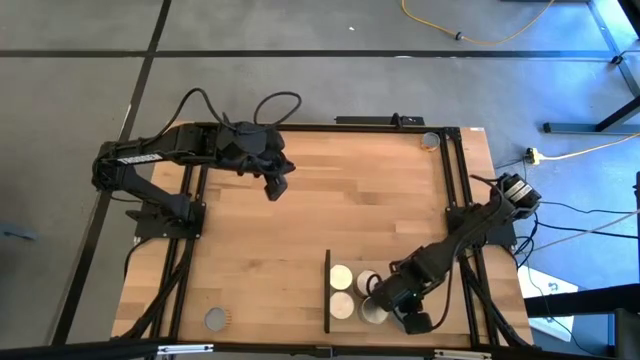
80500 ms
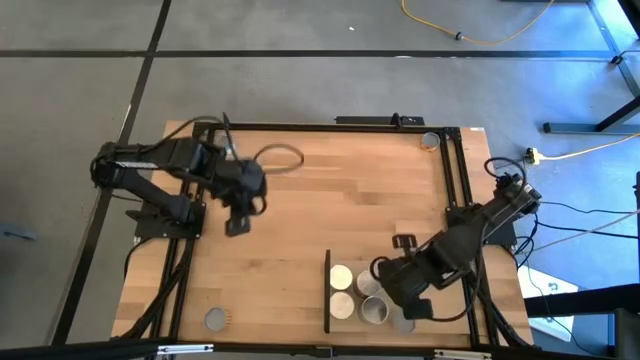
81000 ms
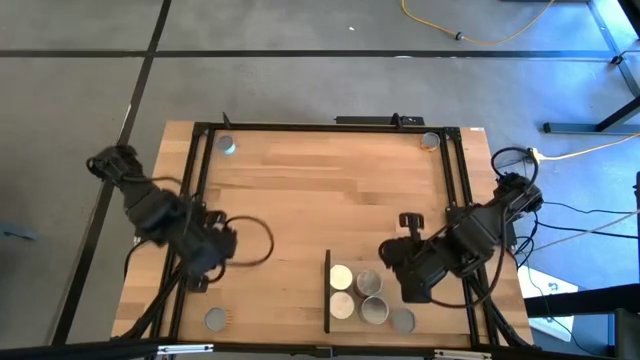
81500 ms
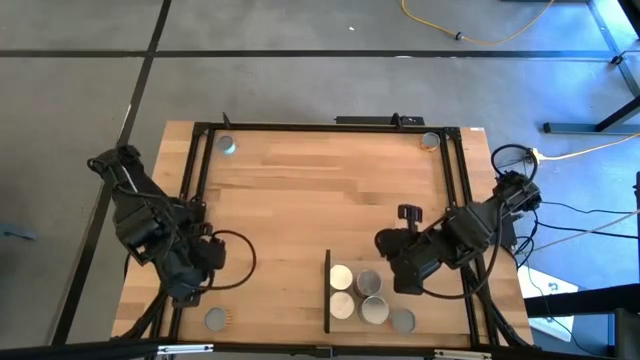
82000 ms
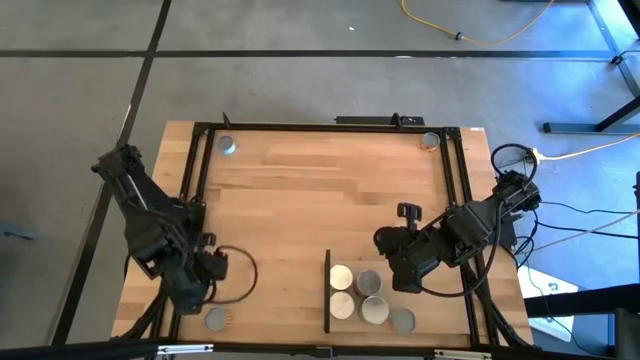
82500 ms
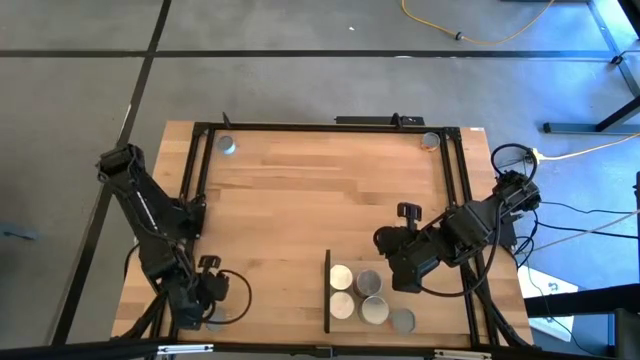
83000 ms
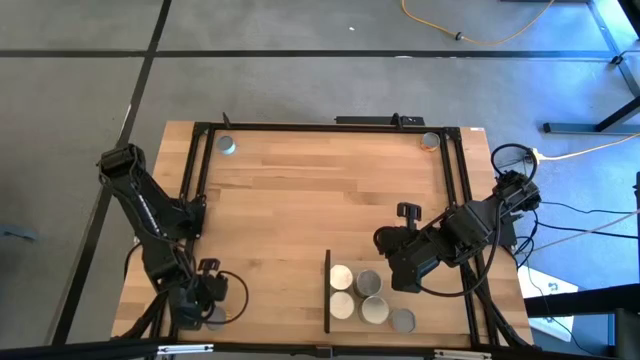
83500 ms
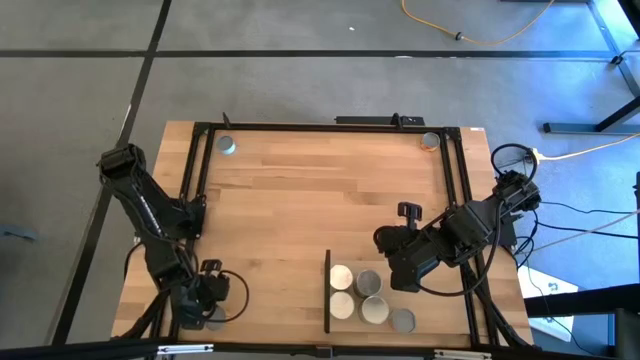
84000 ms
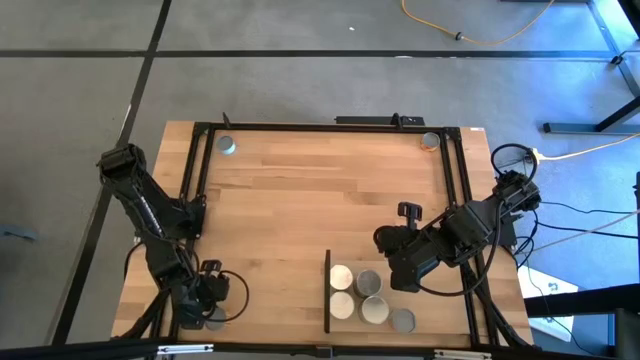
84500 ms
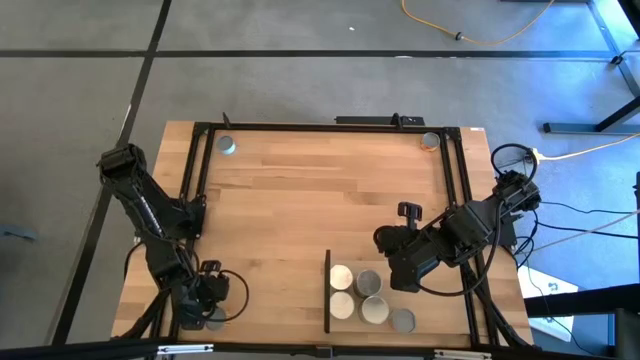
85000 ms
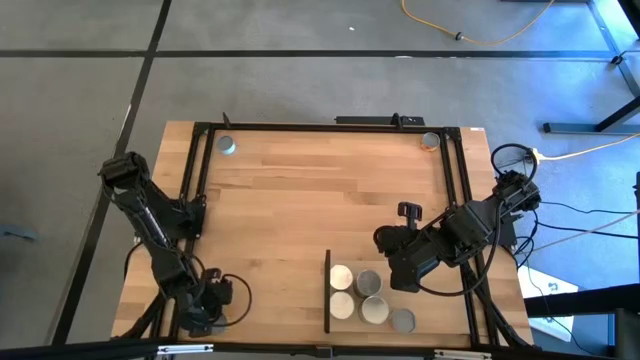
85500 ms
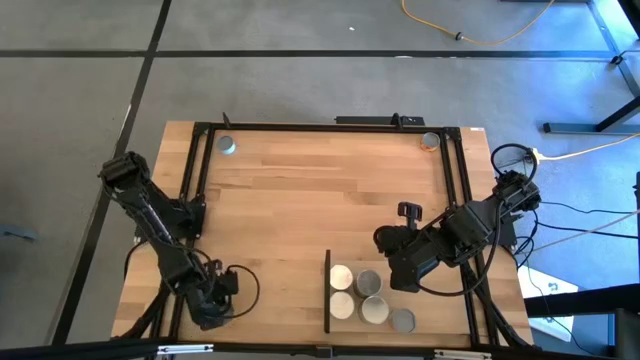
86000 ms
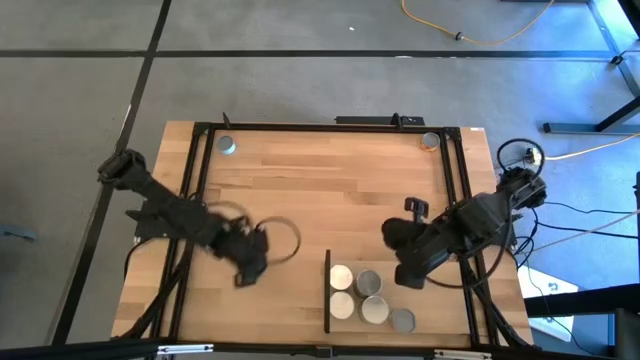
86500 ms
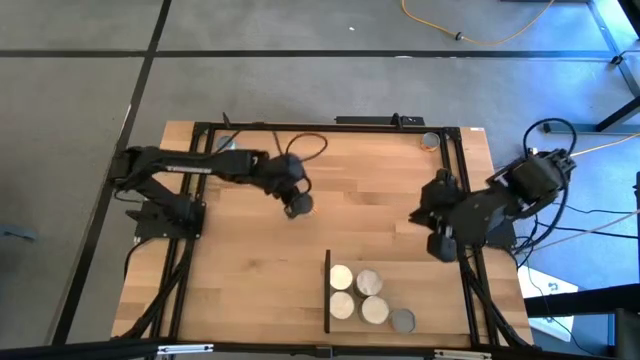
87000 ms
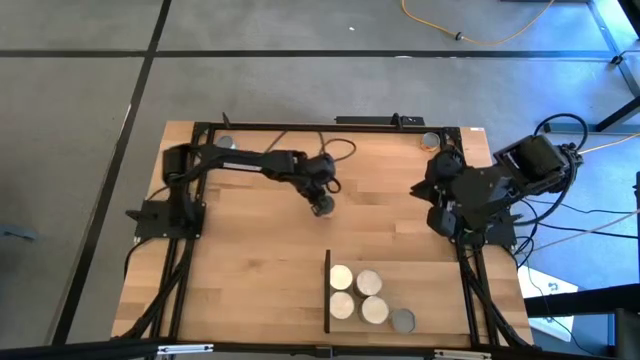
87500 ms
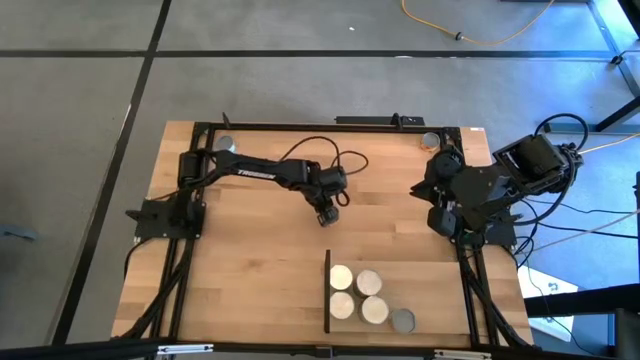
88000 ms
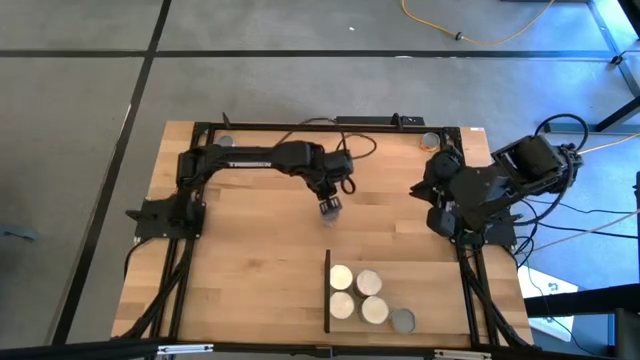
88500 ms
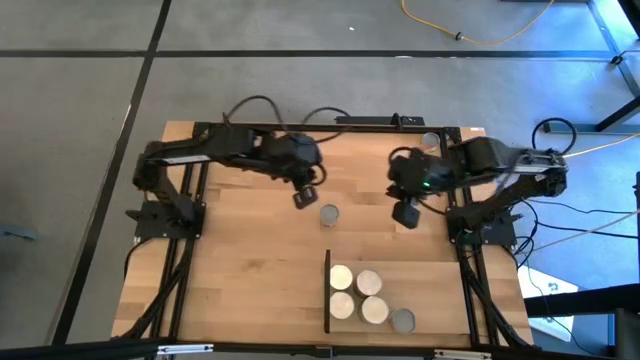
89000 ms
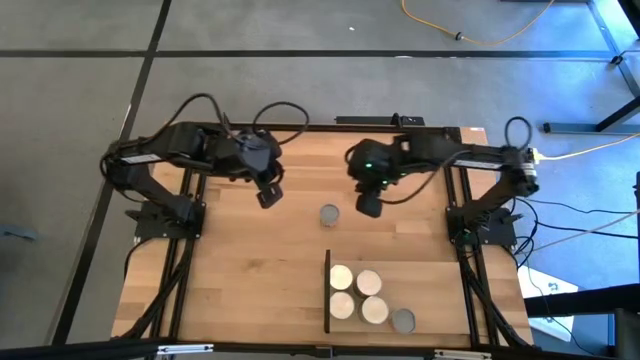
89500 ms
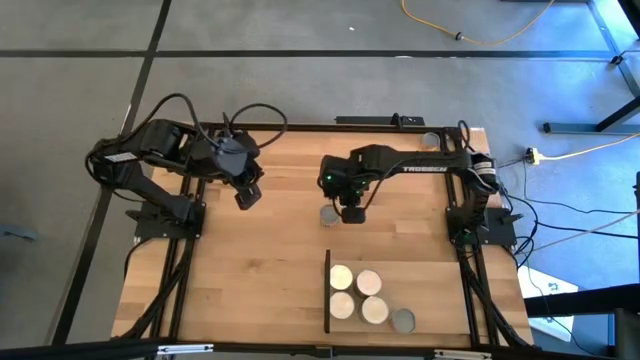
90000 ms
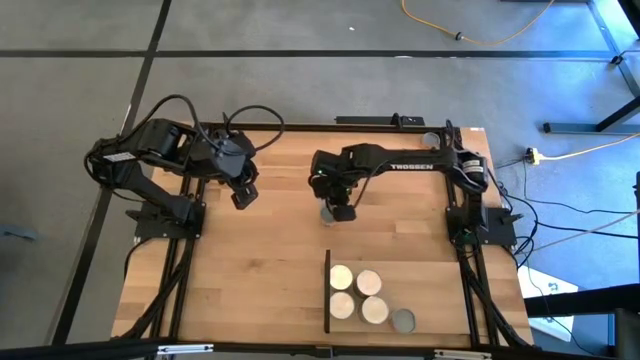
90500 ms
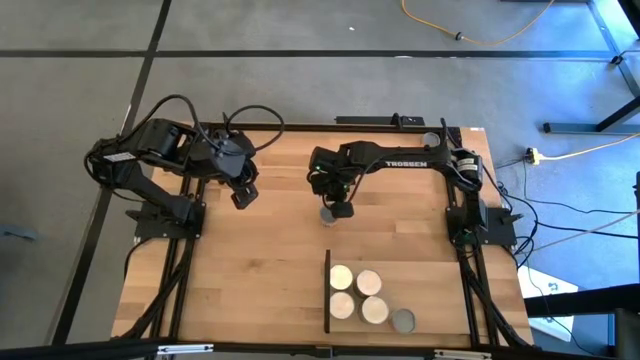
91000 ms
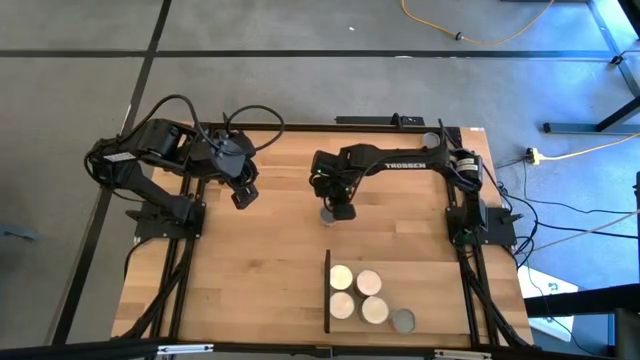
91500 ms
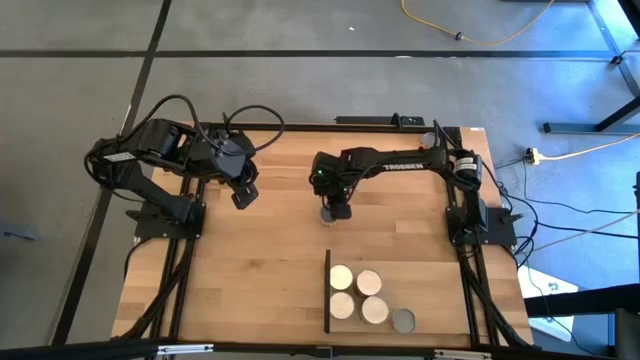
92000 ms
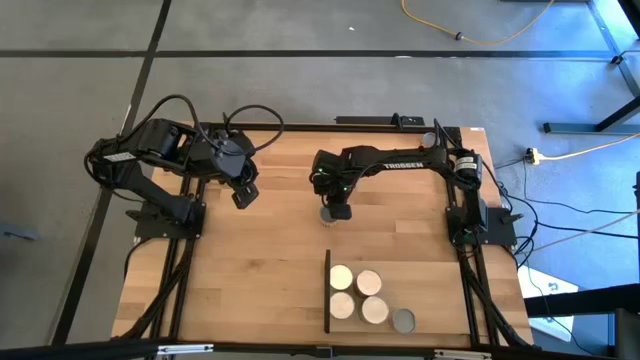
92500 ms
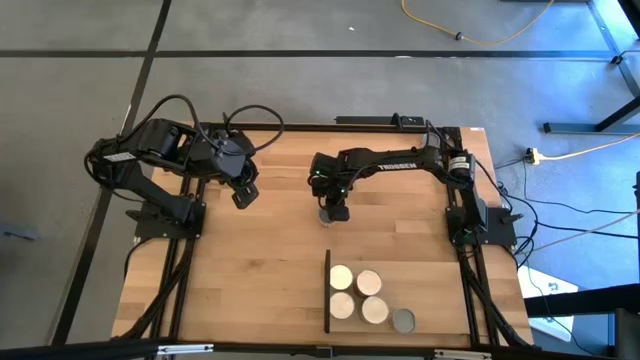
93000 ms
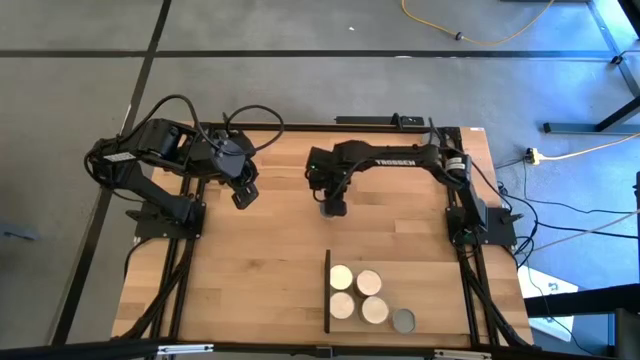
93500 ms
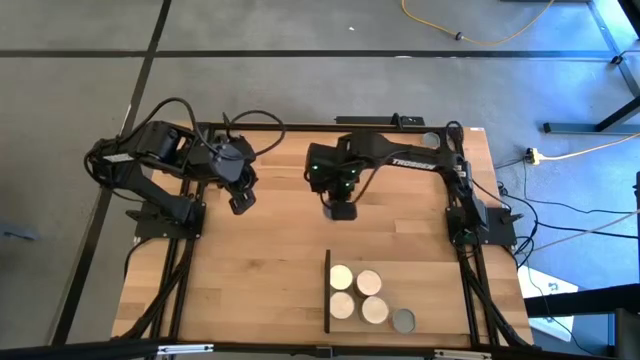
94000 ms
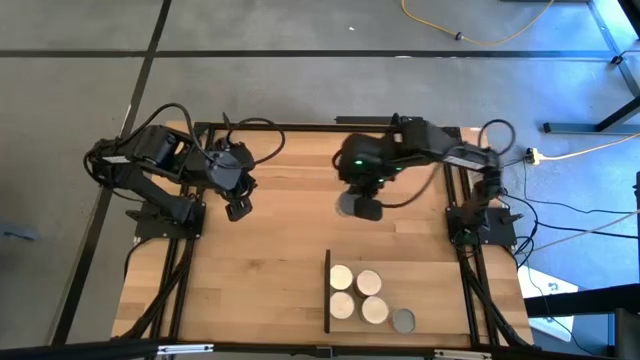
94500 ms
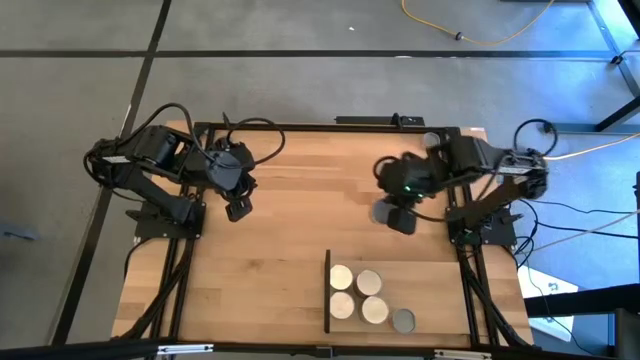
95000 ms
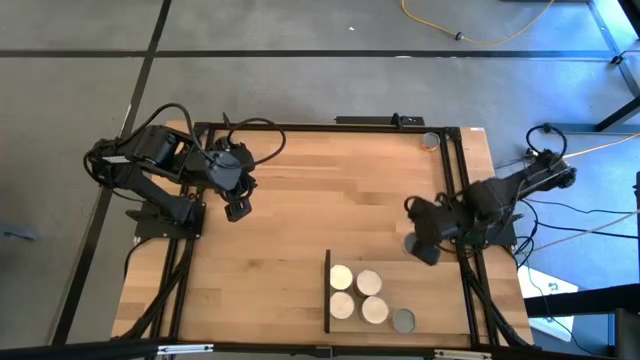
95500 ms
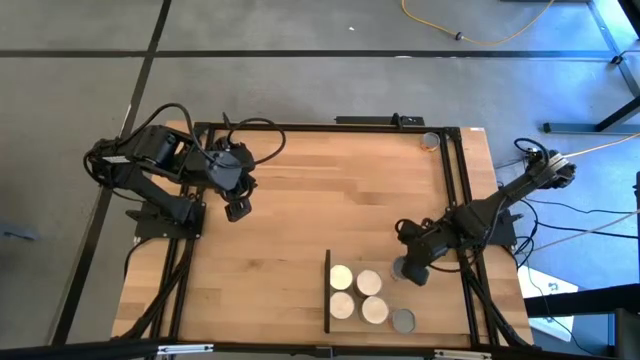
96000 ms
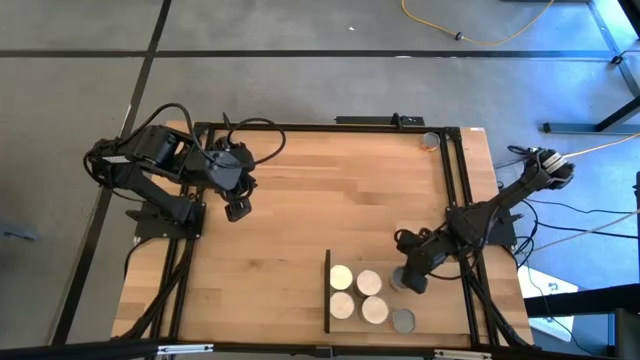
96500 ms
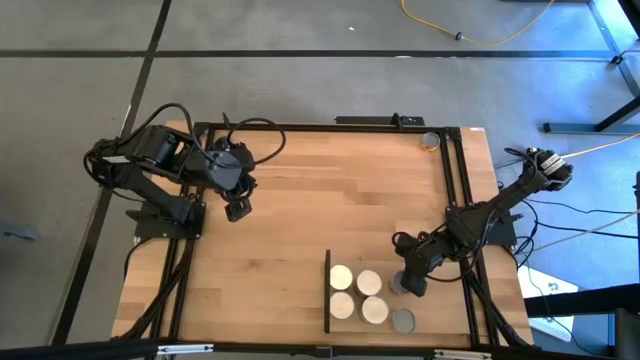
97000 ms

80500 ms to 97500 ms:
Task: Pick and place cans onto a shelf
Put the bottom canned pineapple rings on the shelf

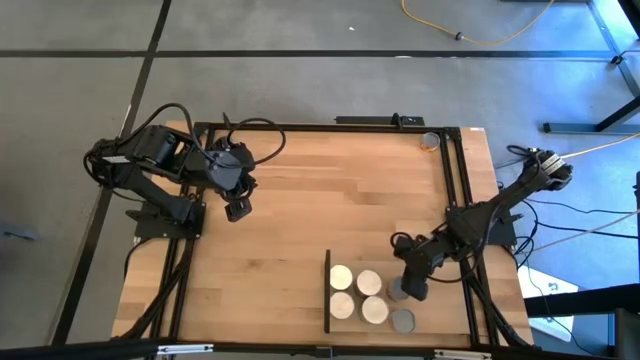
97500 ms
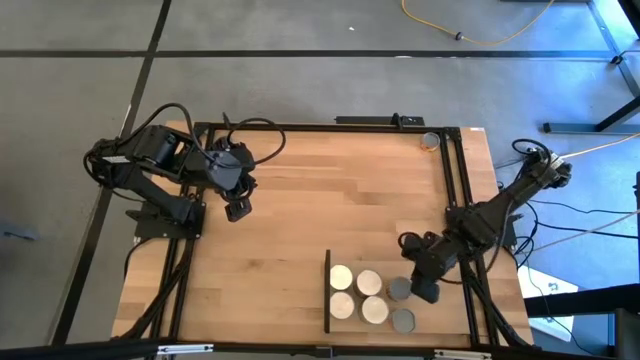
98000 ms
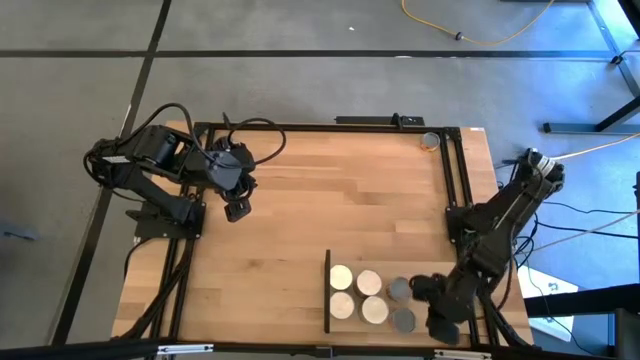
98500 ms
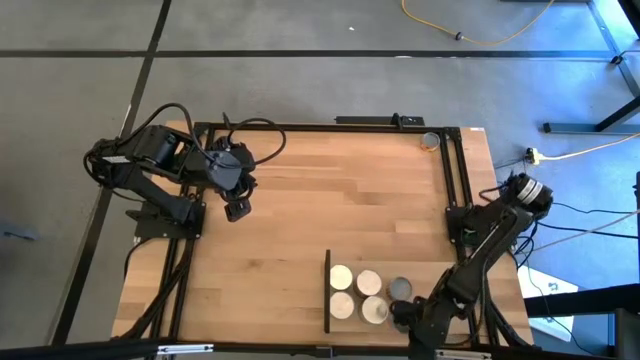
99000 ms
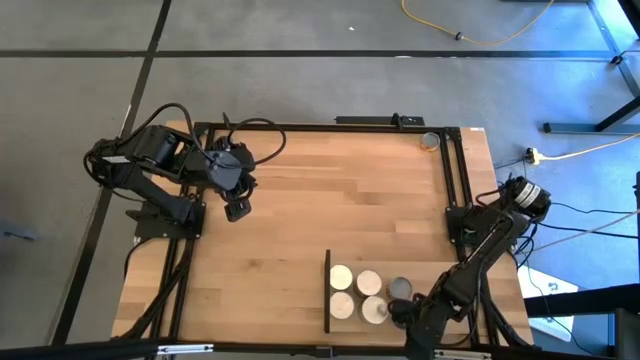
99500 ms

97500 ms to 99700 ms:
Adjust the canned diced tomatoes on the shelf

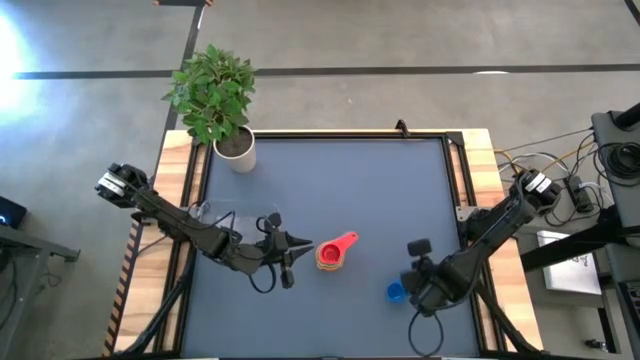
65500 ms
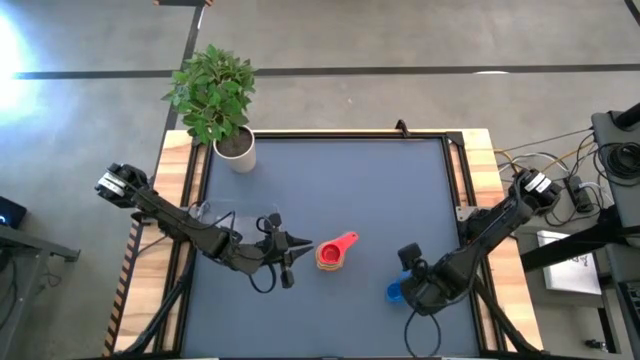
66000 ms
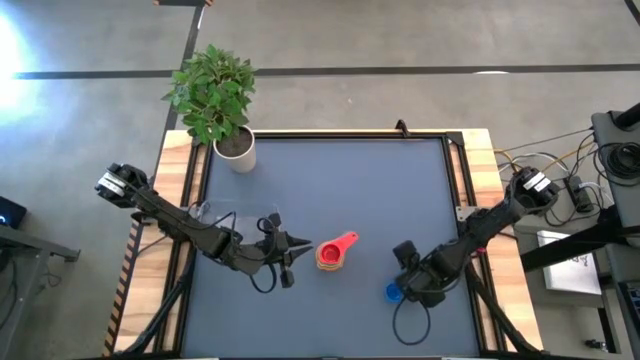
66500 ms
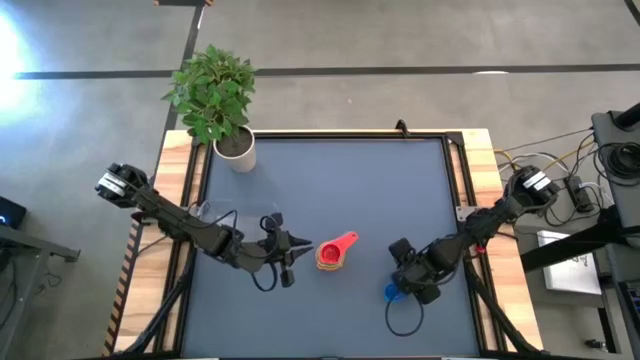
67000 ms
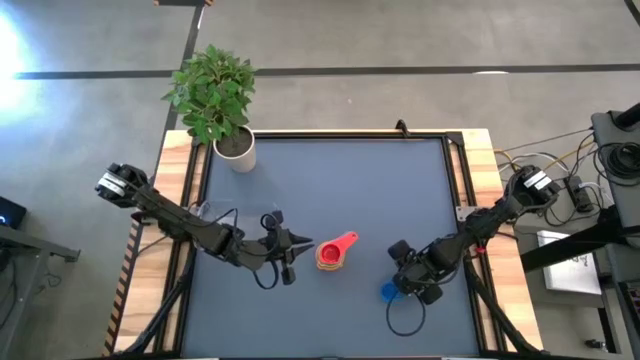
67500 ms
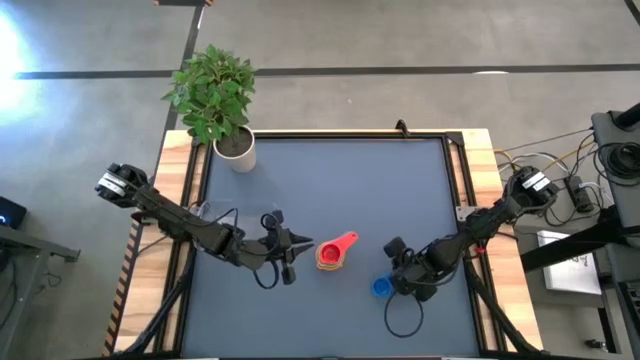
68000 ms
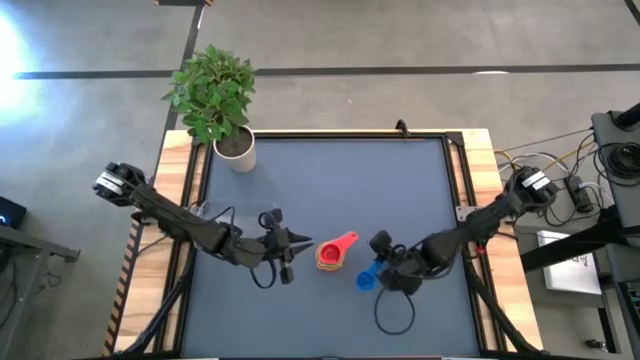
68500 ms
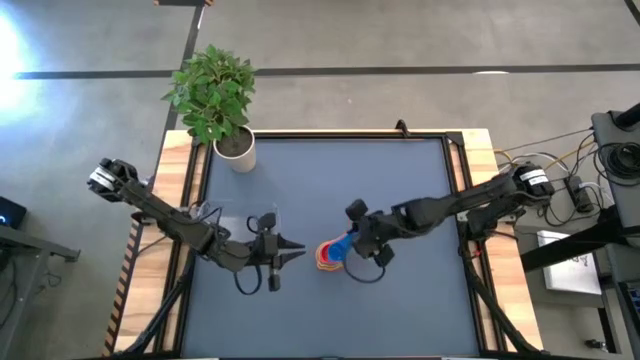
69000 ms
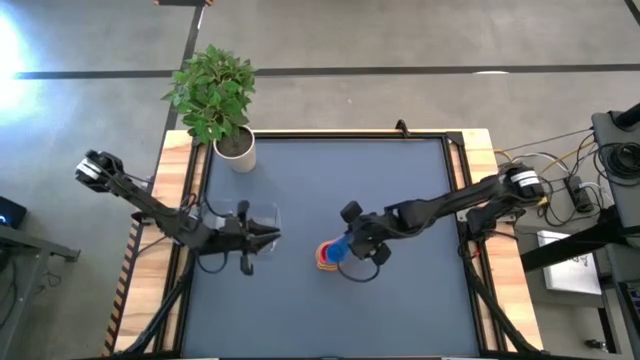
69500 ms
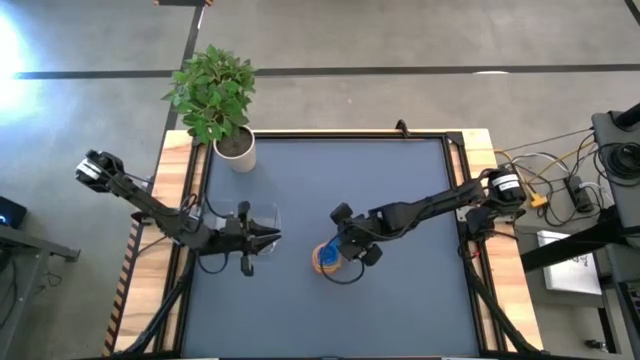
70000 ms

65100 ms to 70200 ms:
Task: Nest measuring cups in basket
Stack the blue measuring cup on top of the orange measuring cup
